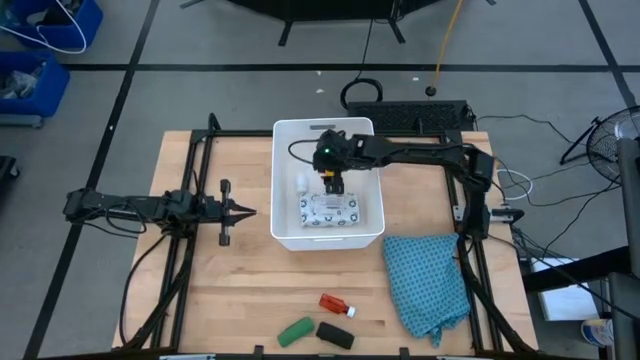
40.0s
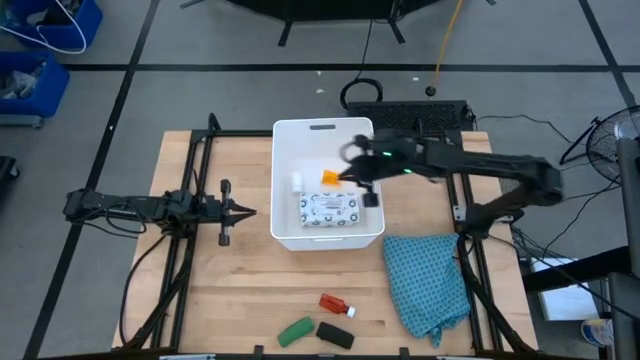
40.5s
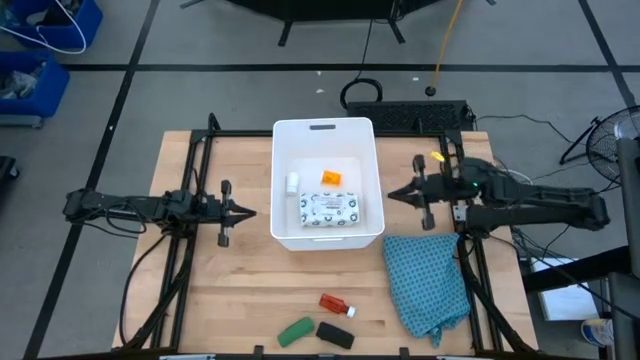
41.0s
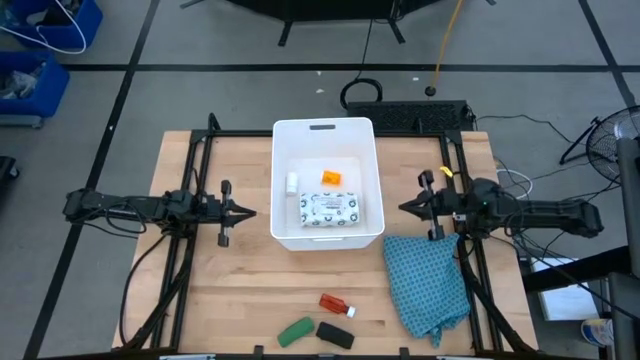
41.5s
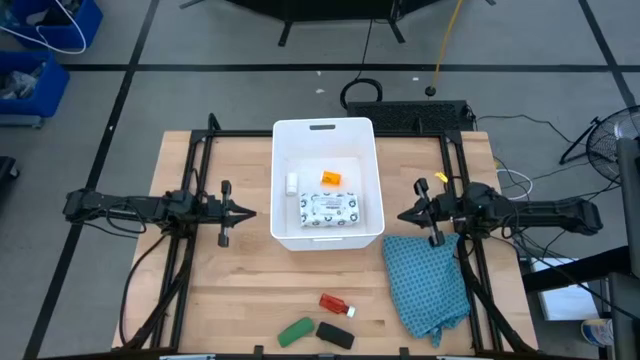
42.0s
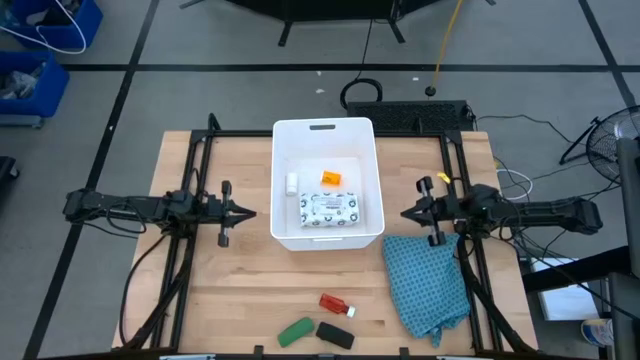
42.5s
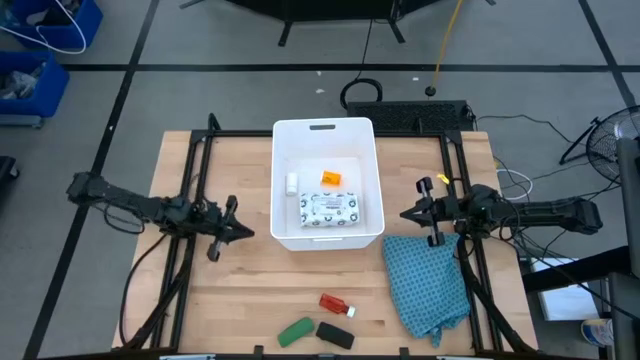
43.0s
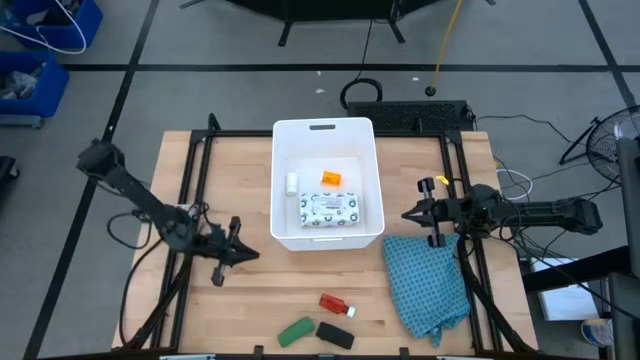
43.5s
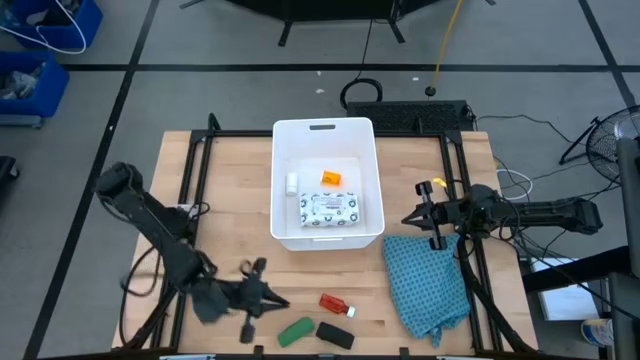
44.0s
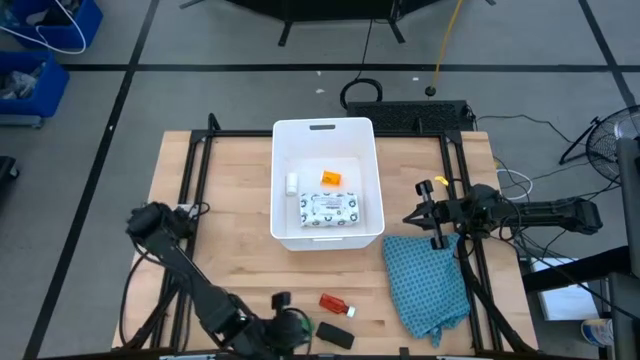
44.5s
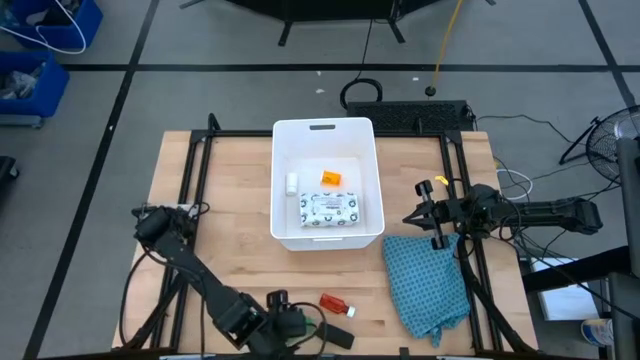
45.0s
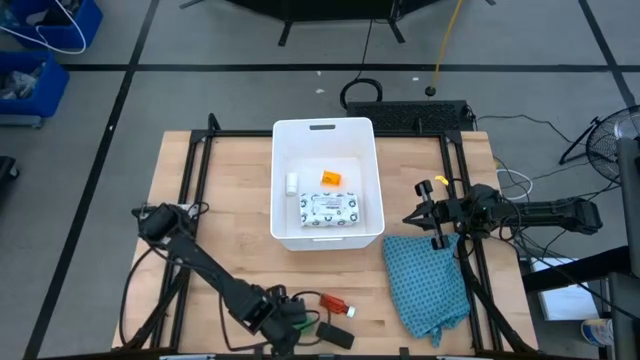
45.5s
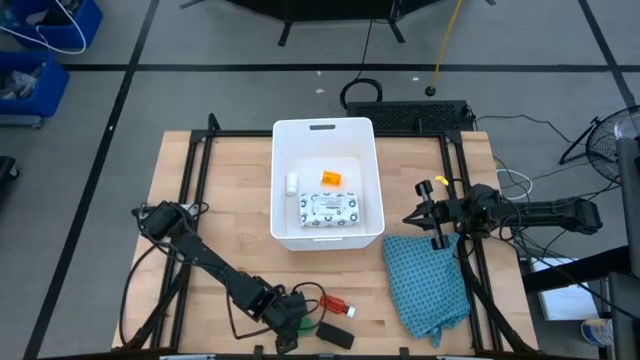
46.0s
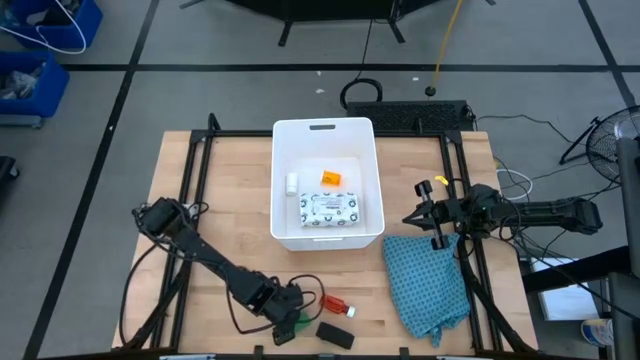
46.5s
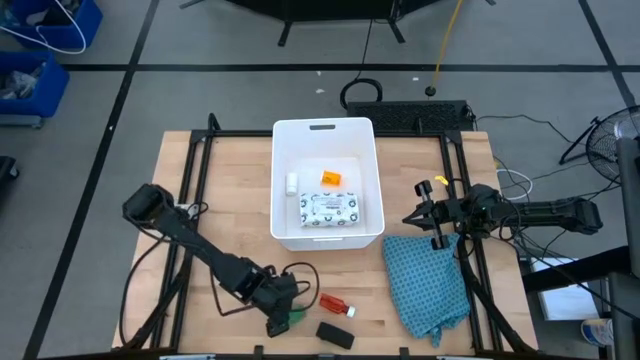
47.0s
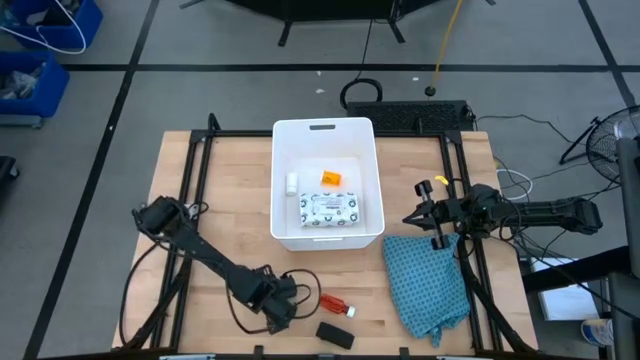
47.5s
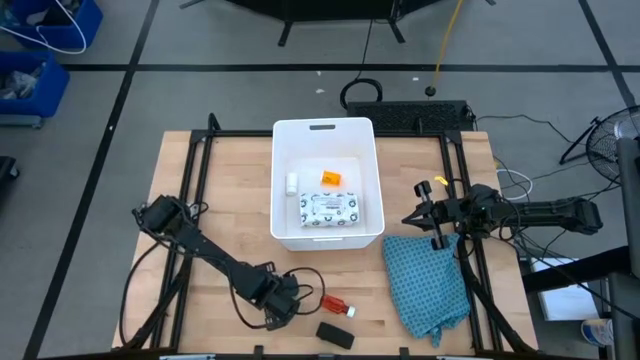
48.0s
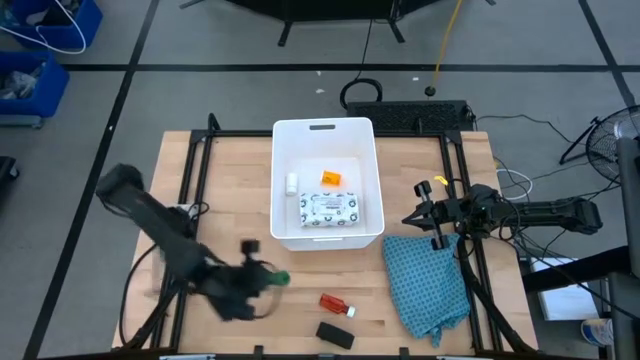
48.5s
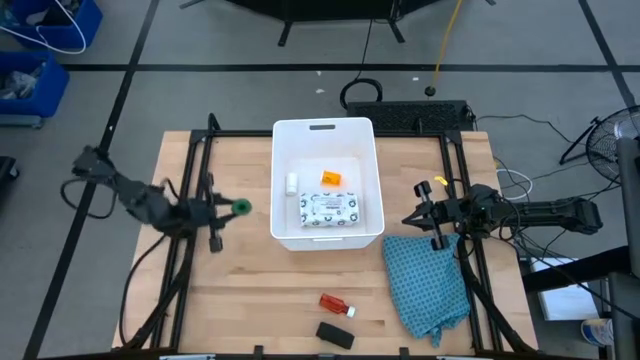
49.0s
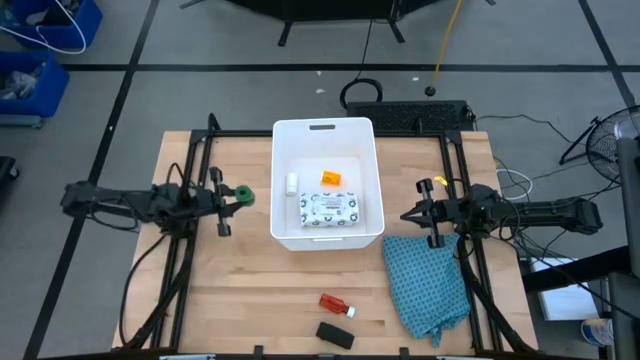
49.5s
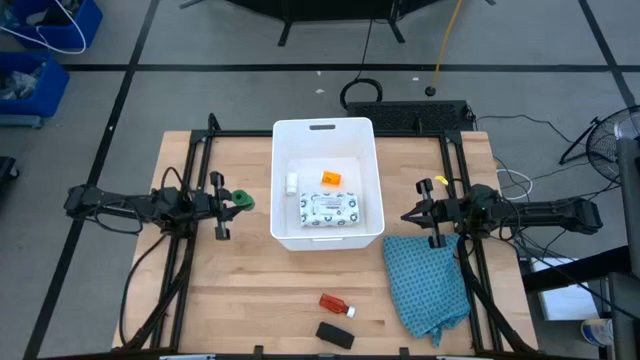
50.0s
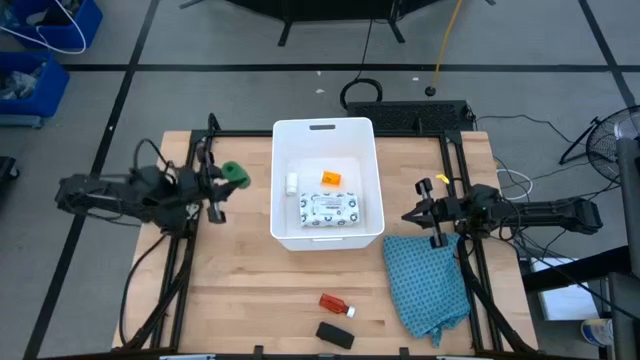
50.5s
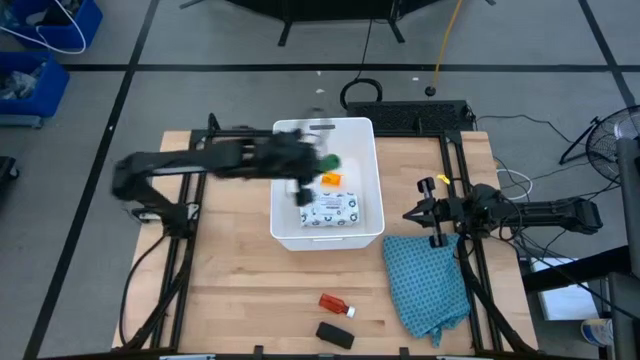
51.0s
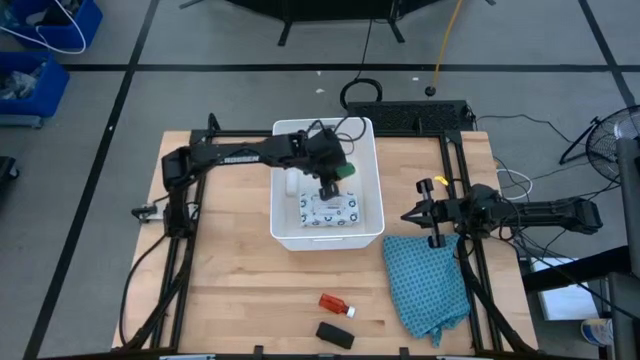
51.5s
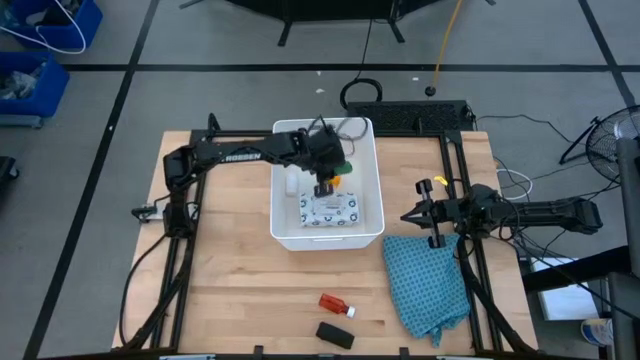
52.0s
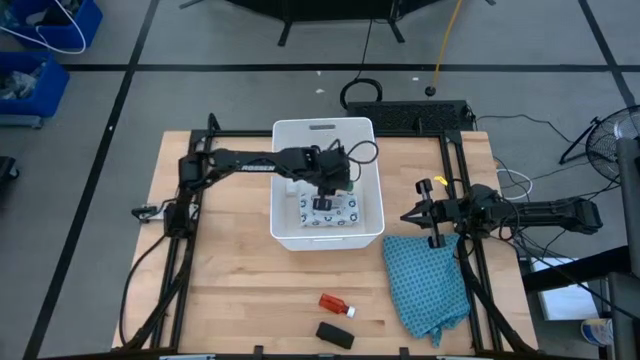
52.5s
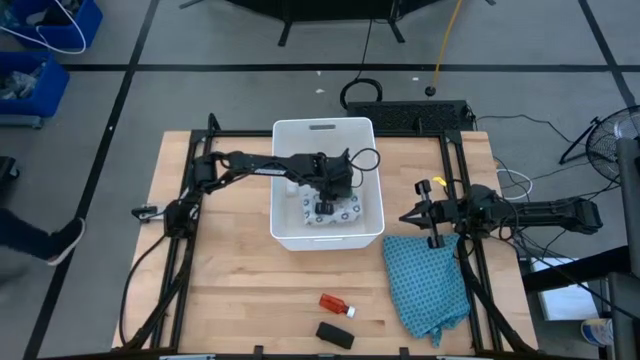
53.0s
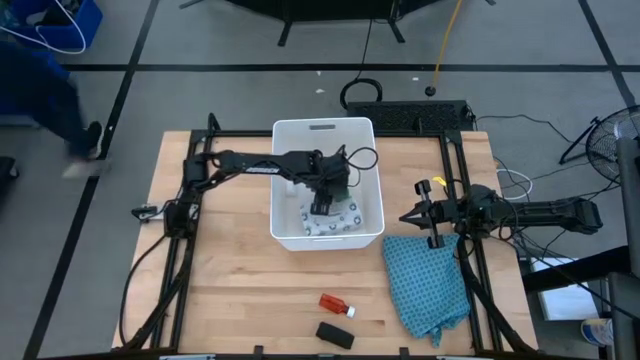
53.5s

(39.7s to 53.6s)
Task: Pick & place medical supplies in basket/bin
Put the green bandage into the white bin

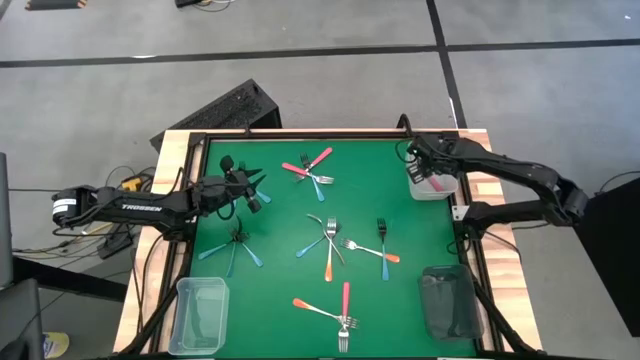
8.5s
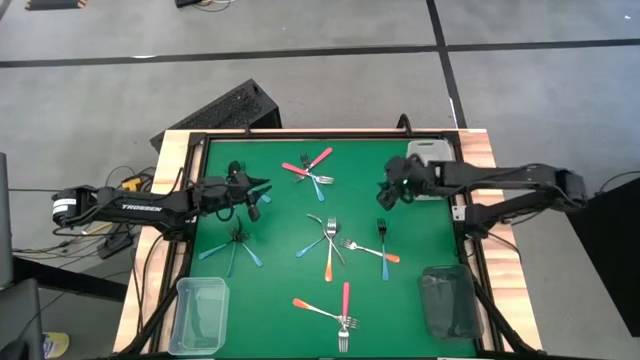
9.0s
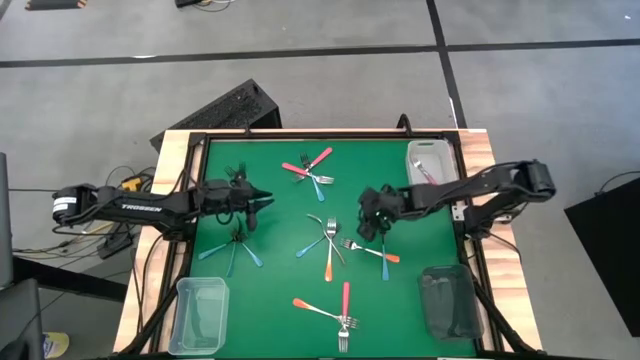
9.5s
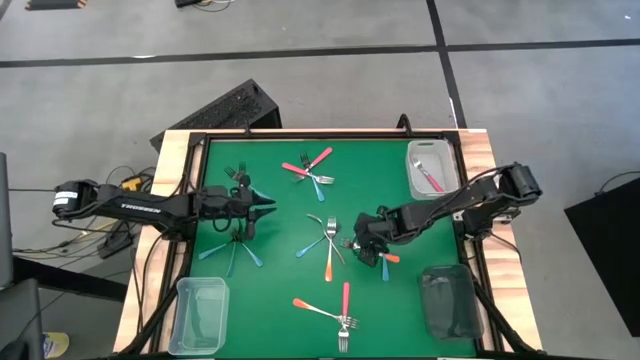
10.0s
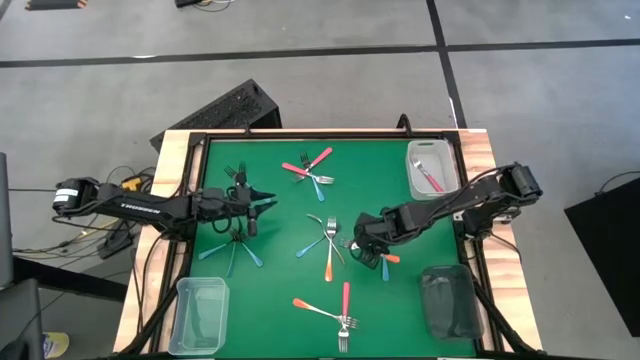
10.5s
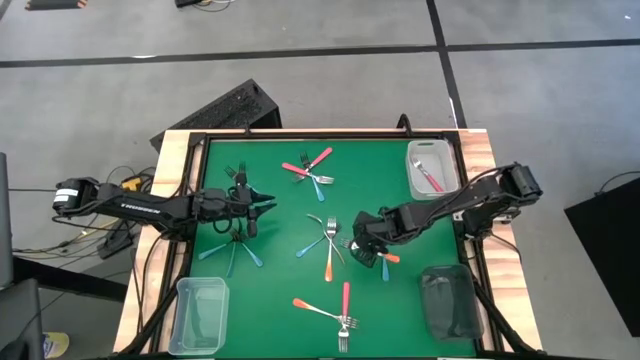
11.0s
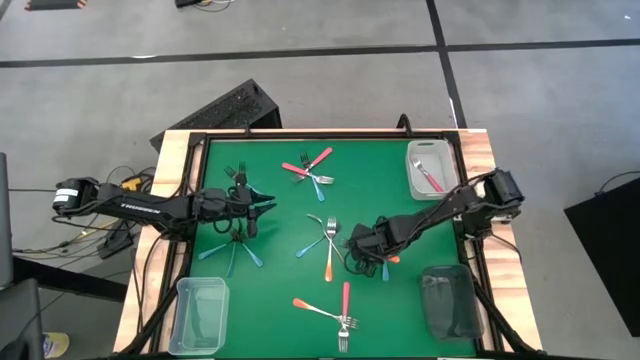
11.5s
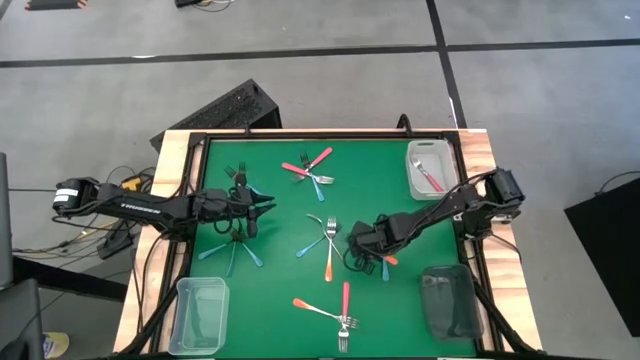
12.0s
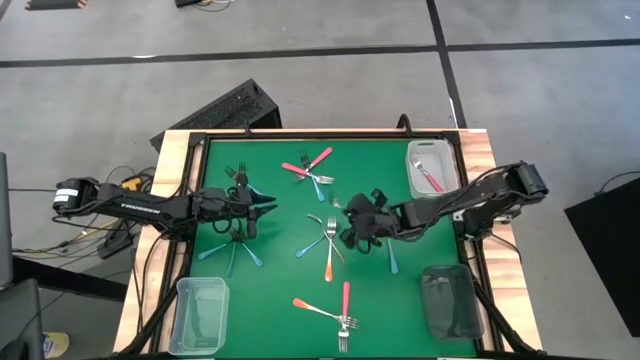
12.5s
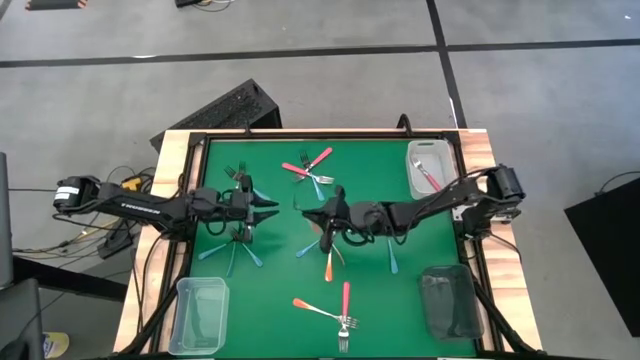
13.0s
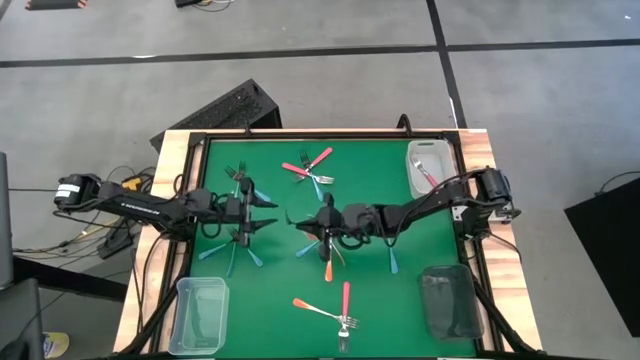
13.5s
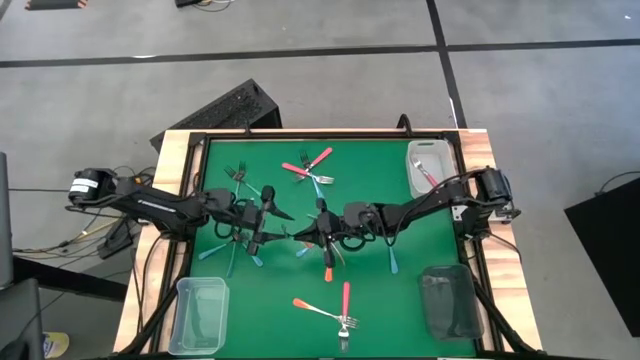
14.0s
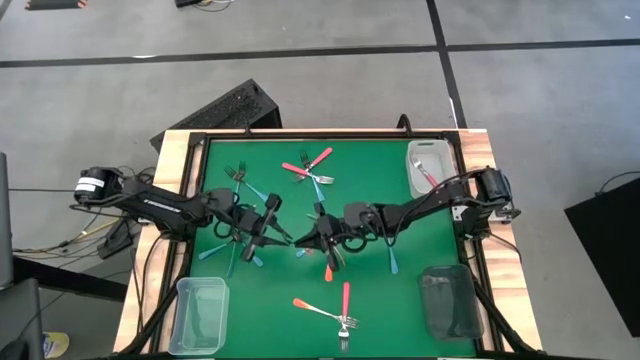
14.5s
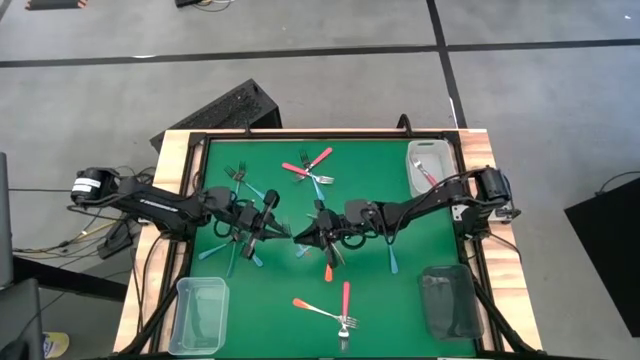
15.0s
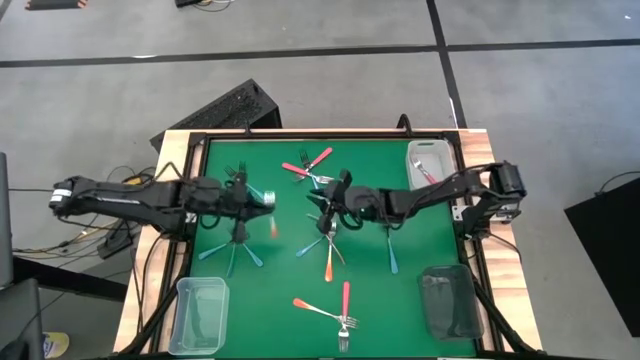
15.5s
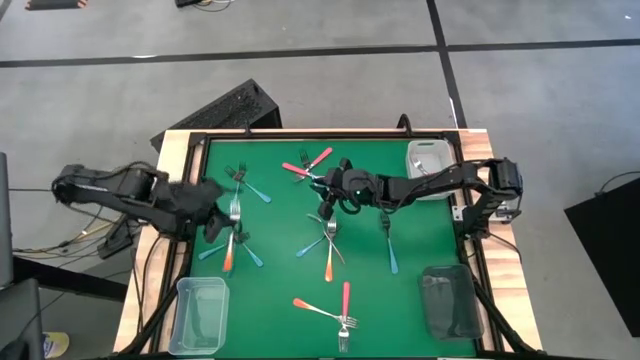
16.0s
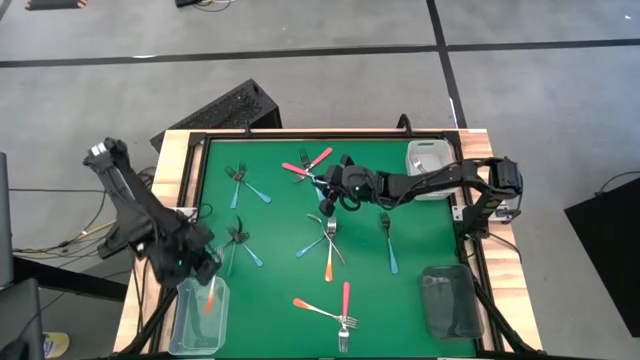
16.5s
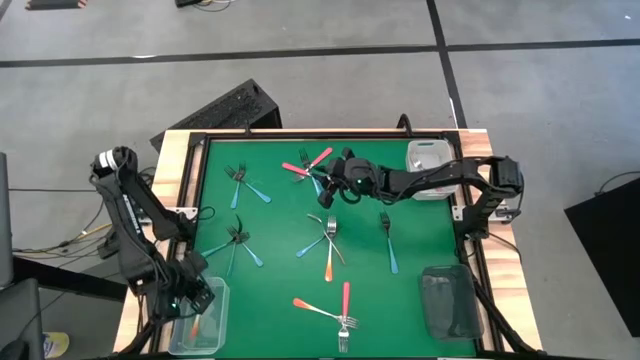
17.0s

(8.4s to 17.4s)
Task: Sort silverware by color (type)
Put the orange fork into the transparent bin
